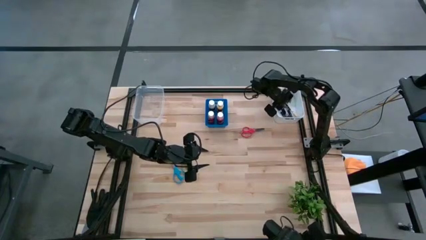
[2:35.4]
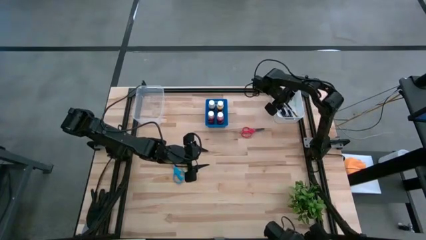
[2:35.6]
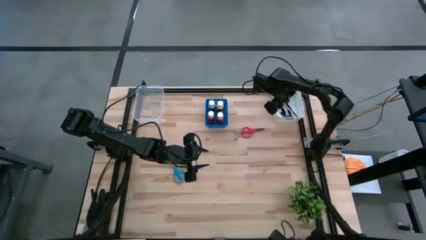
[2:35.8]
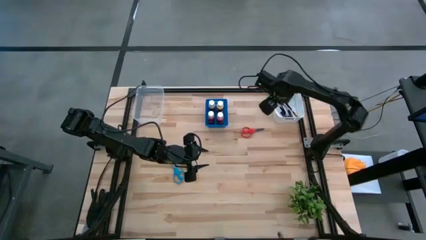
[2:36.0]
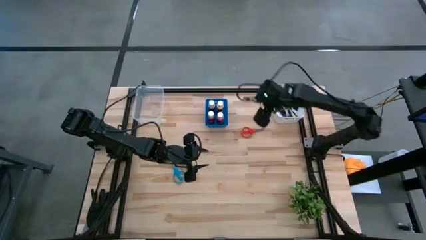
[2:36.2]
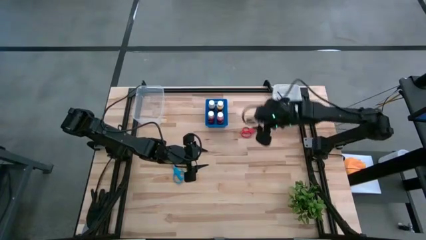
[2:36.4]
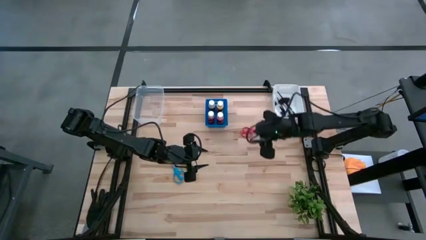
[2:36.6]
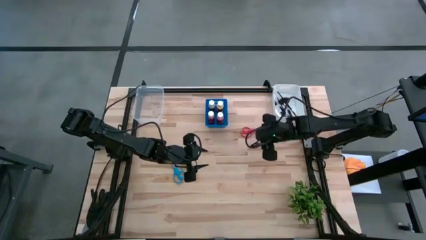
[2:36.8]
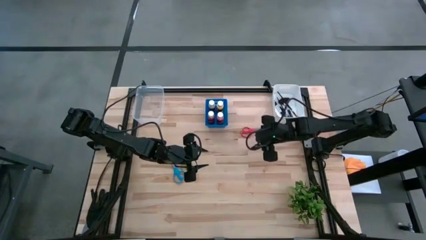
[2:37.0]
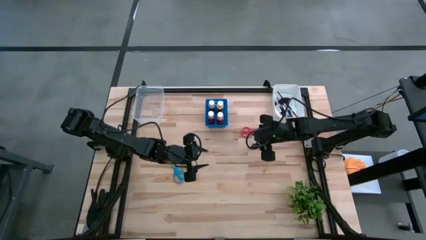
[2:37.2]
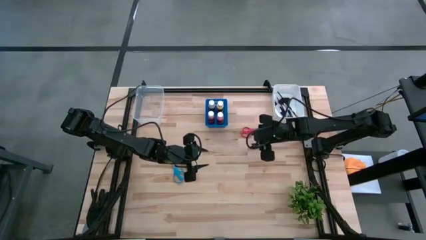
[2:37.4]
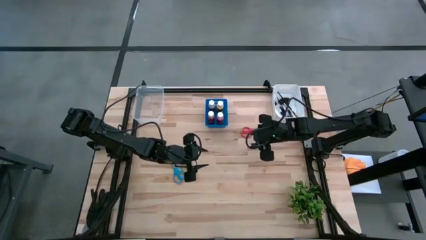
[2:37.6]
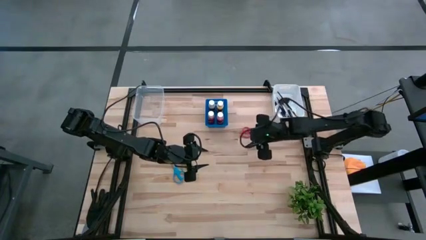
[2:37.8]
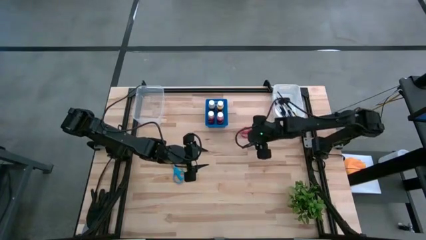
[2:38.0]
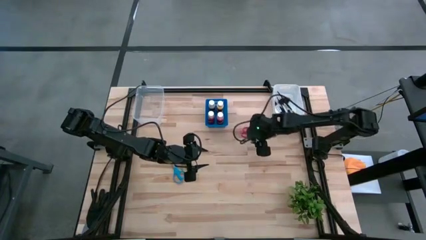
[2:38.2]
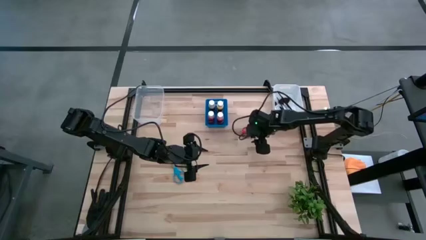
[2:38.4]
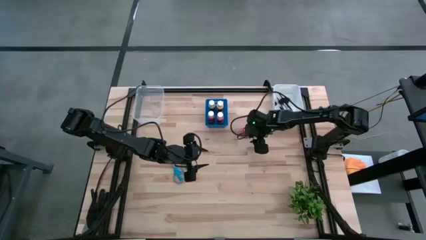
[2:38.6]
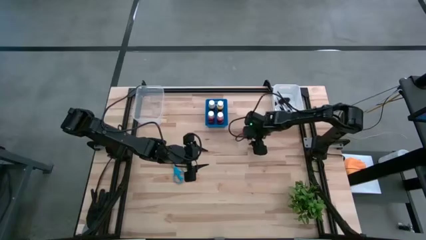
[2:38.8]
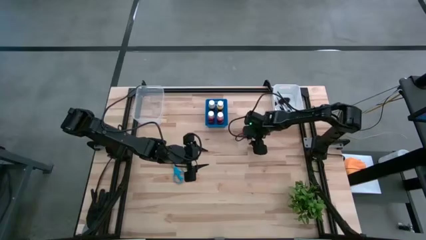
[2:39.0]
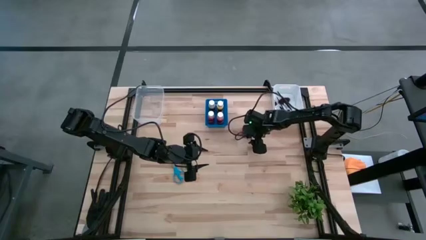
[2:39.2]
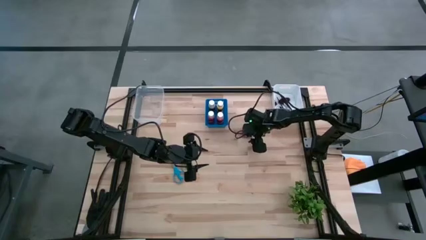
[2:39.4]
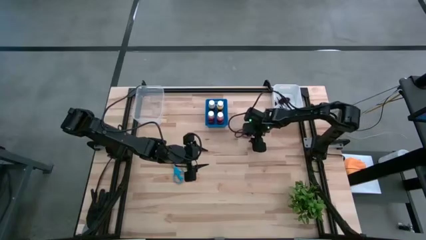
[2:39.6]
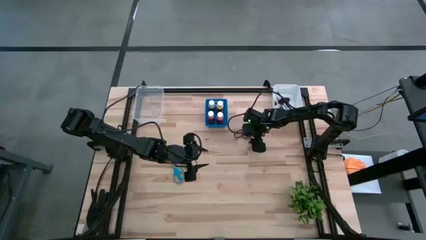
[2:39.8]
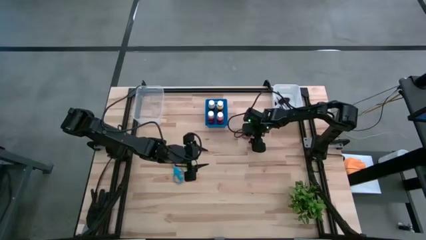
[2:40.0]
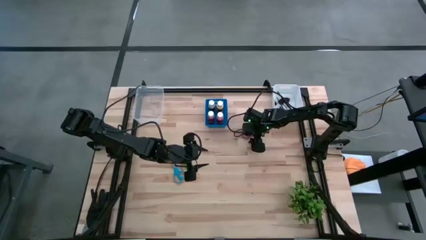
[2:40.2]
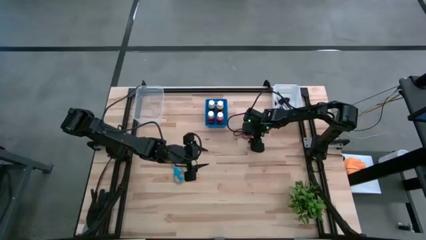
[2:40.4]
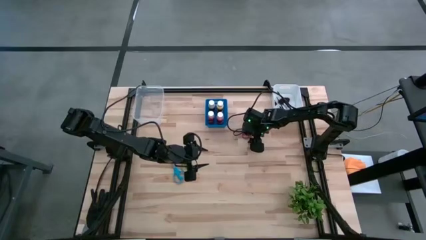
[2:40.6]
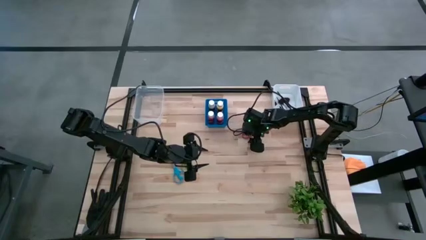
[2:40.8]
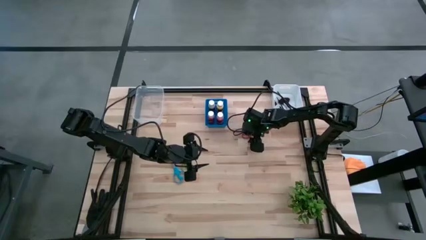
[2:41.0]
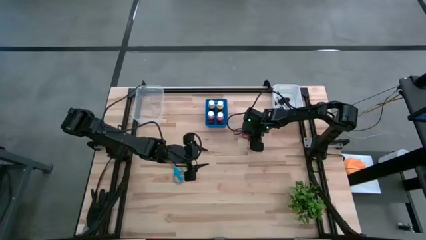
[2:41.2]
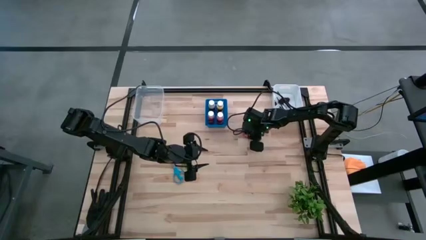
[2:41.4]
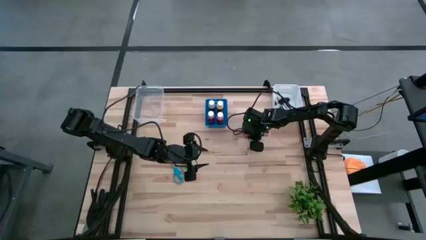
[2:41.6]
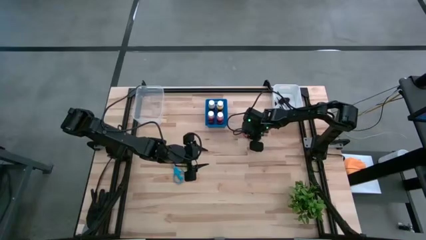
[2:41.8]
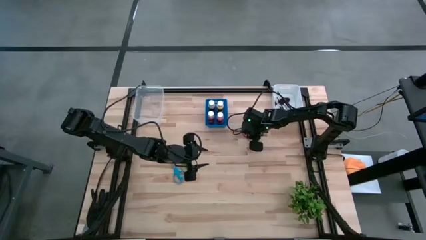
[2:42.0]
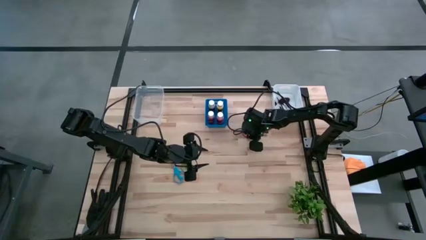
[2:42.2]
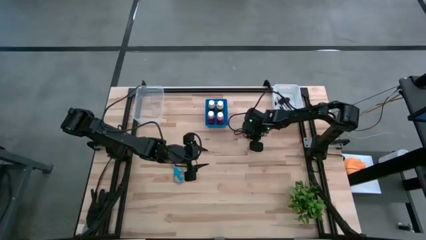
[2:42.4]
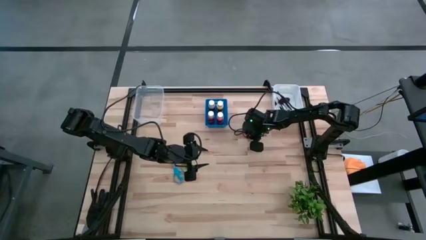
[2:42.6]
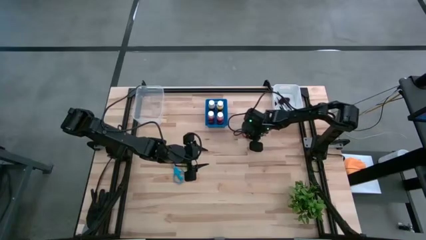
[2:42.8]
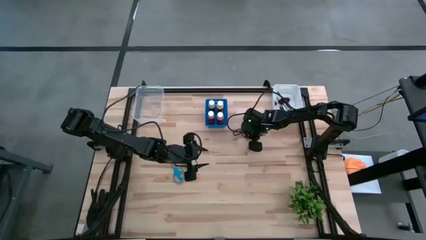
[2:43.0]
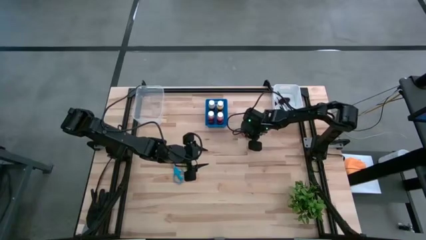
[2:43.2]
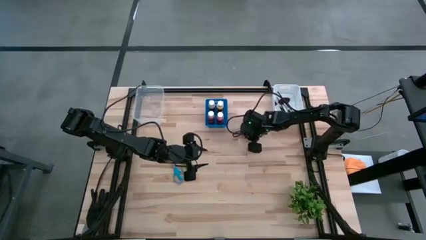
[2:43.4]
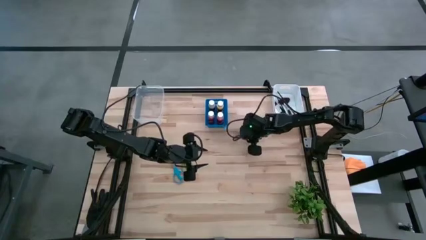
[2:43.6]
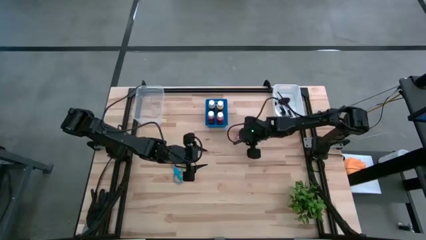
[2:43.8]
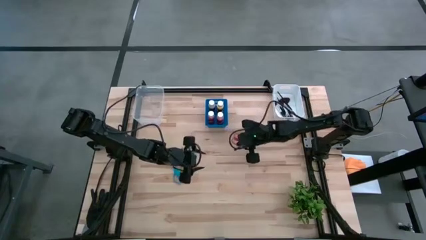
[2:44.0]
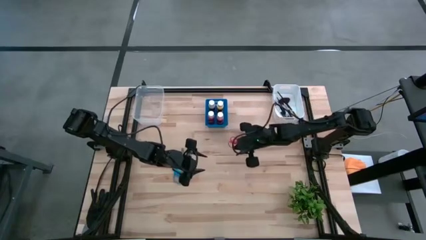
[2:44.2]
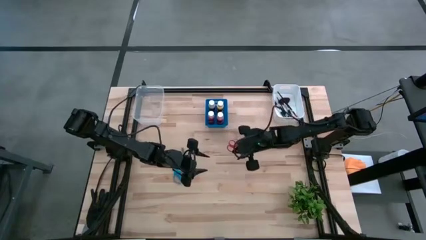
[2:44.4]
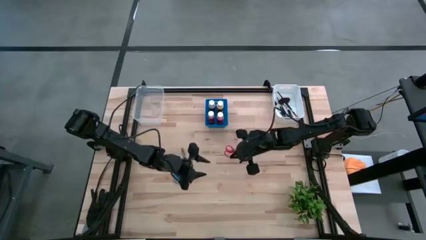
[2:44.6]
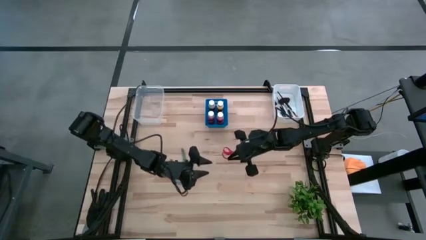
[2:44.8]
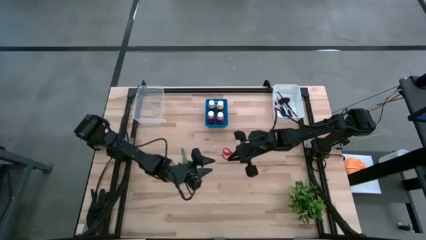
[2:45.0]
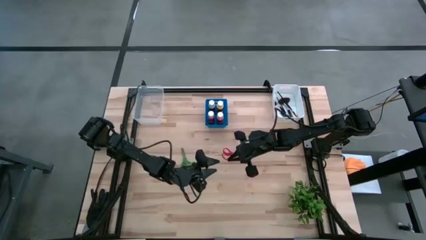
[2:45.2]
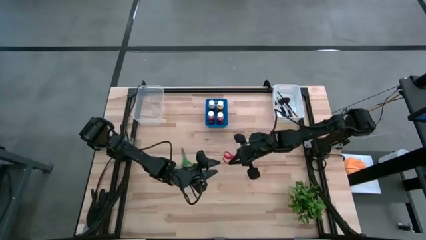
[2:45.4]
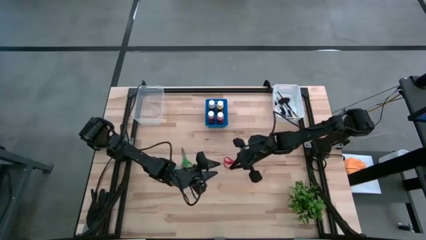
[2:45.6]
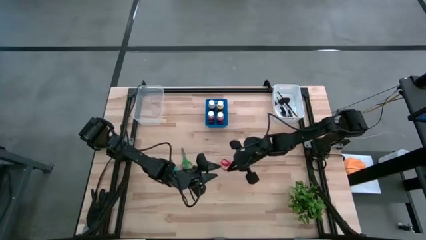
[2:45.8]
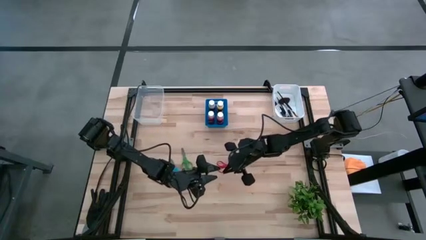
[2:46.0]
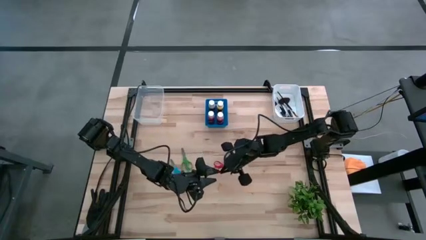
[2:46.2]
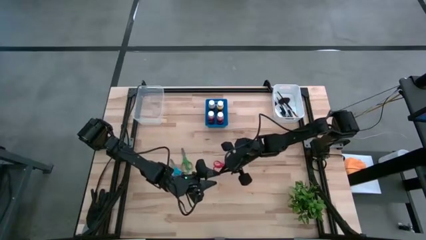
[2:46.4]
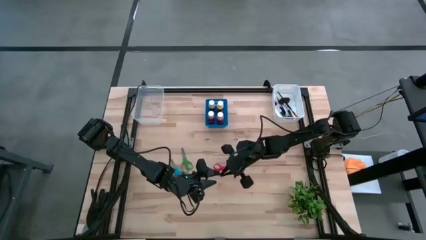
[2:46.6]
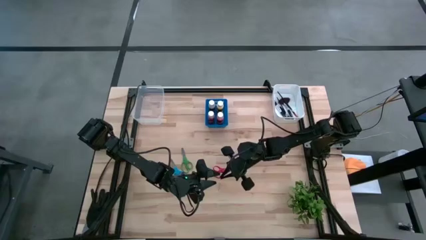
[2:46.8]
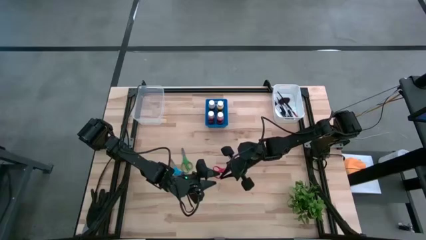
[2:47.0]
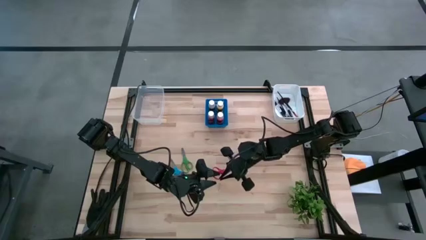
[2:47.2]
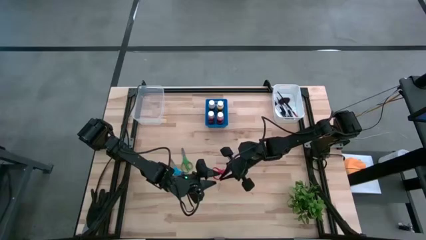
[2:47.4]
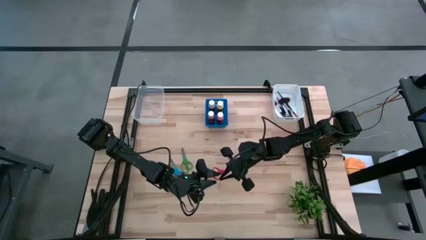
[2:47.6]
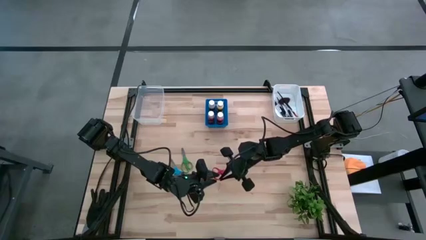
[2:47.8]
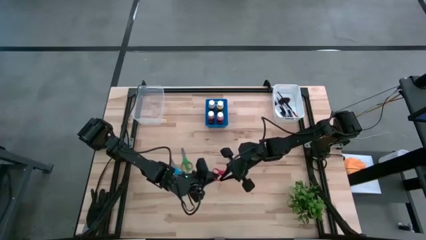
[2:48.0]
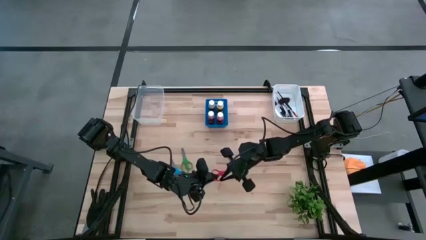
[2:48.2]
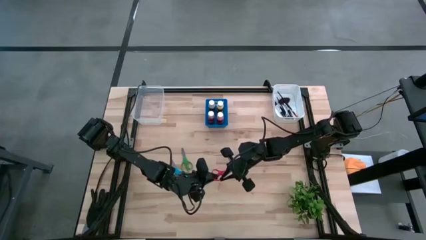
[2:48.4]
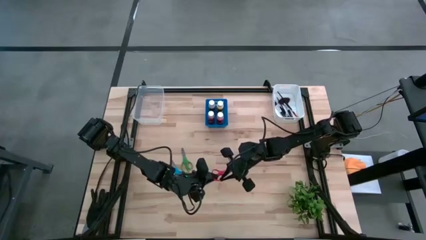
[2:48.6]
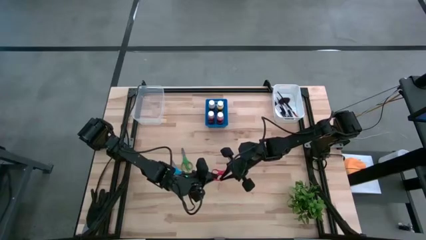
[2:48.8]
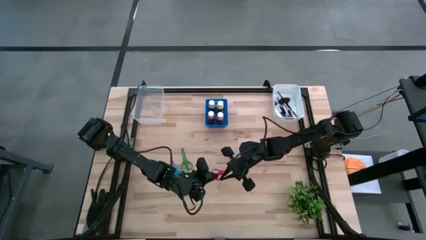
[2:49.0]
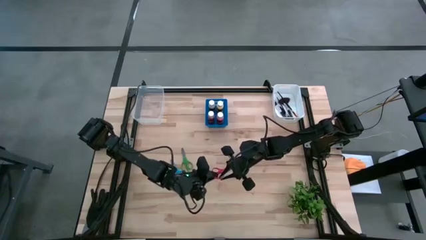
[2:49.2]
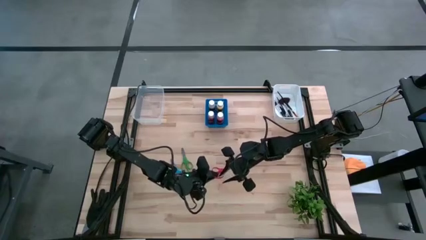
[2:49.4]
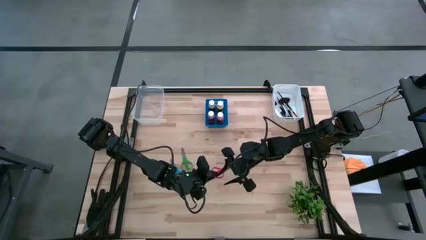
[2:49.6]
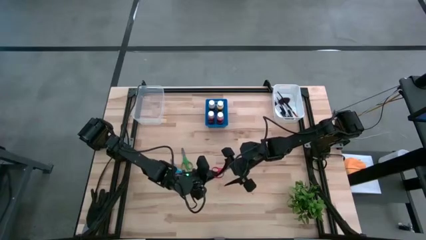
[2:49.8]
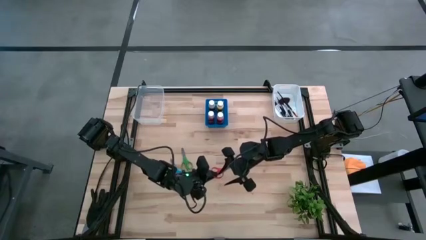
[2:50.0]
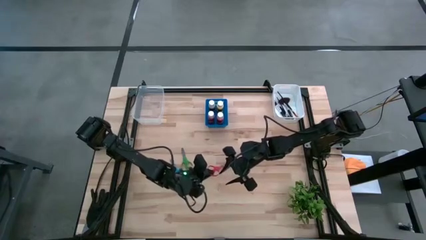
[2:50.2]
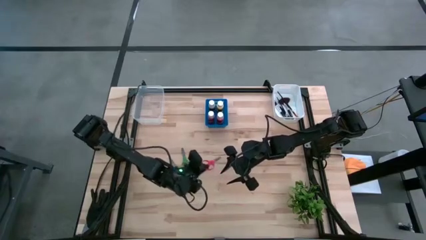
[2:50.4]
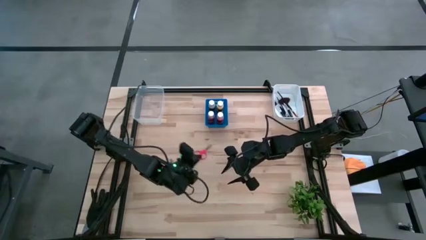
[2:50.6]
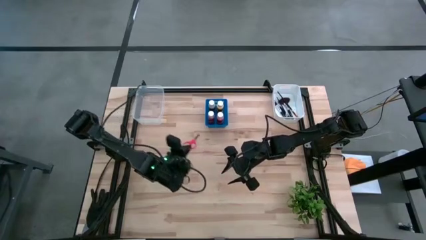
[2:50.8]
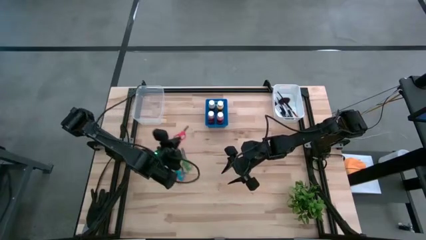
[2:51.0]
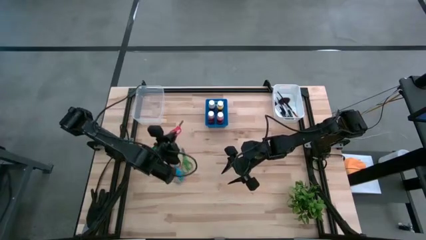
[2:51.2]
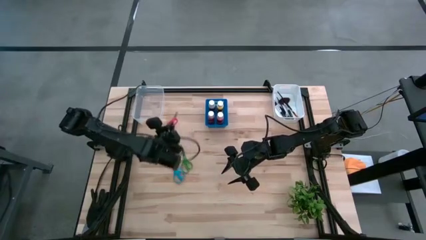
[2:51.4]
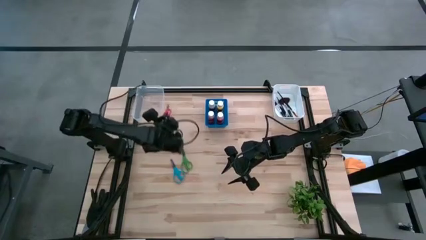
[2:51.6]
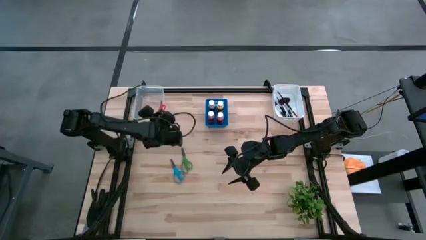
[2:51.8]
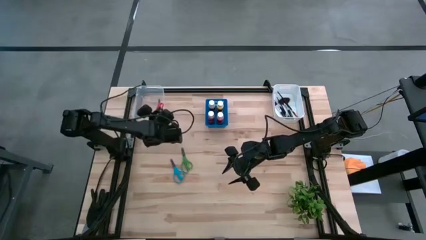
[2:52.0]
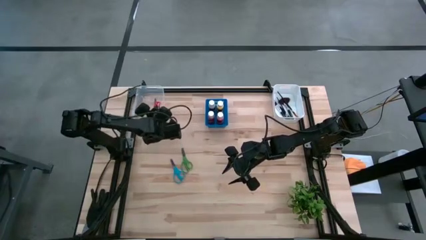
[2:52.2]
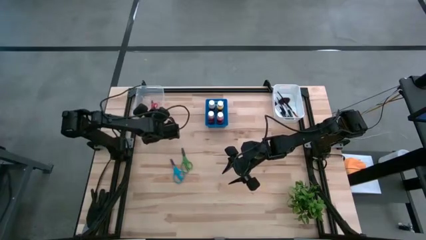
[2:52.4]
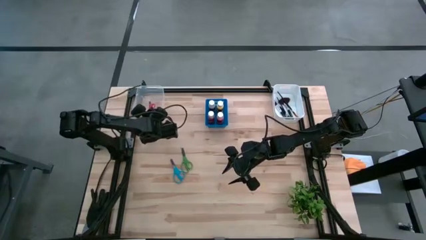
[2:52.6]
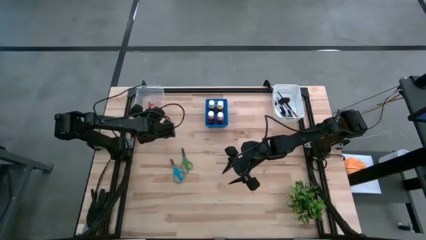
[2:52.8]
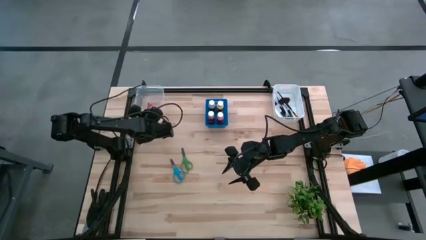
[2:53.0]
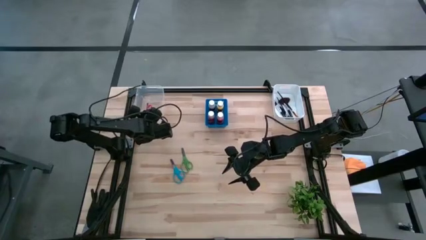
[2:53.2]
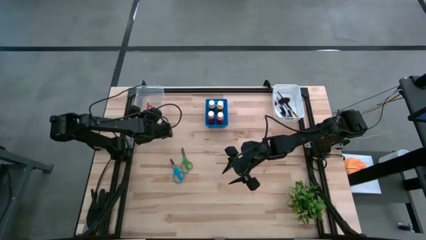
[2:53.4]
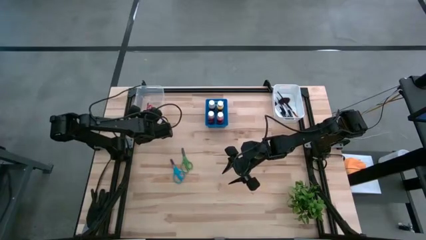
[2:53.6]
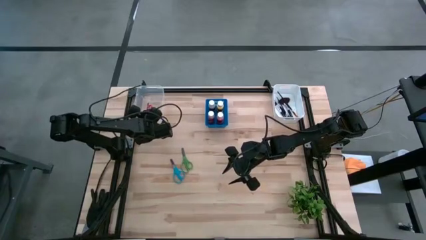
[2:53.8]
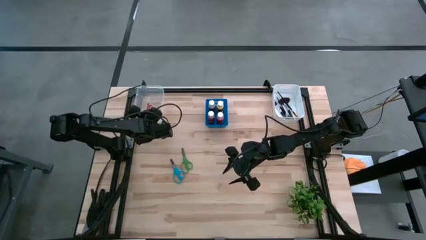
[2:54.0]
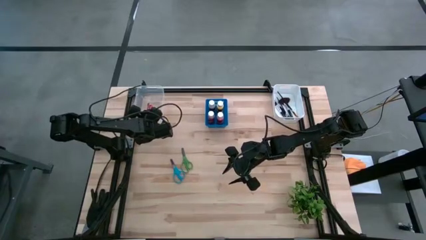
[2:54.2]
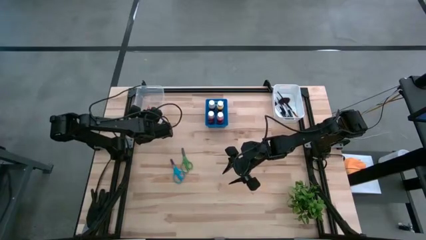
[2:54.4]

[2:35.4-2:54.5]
Task: Pick & Place Paint Supplies
Put the red scissors into the transparent bin
